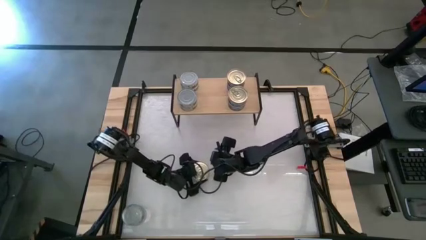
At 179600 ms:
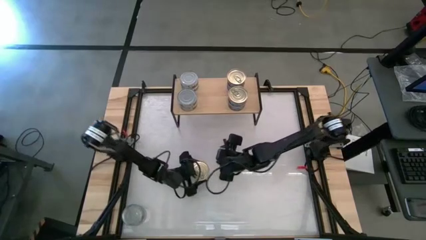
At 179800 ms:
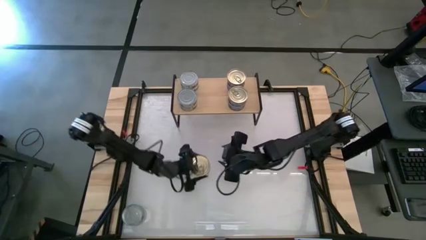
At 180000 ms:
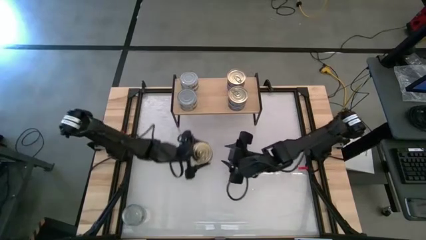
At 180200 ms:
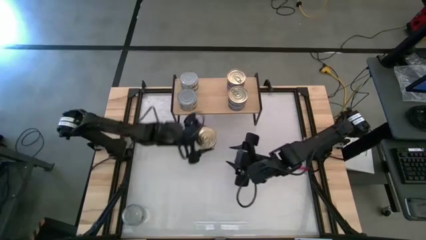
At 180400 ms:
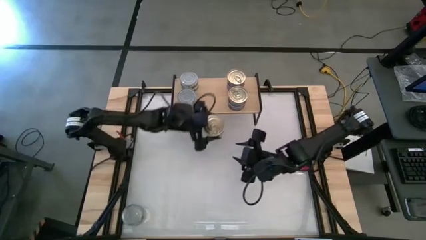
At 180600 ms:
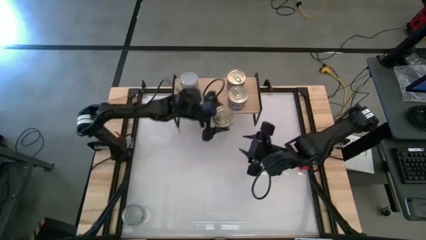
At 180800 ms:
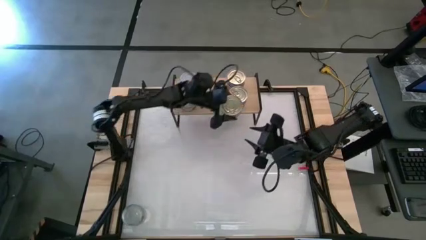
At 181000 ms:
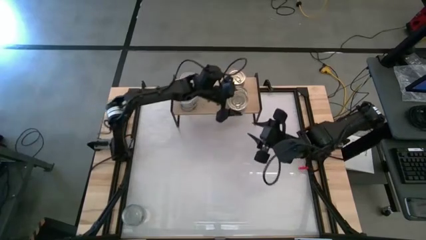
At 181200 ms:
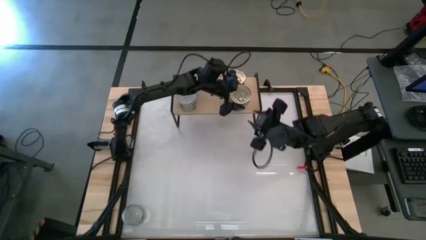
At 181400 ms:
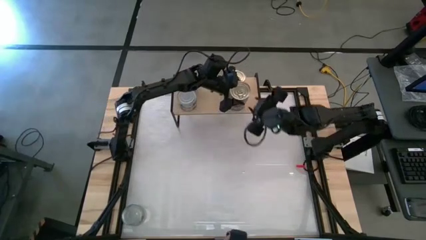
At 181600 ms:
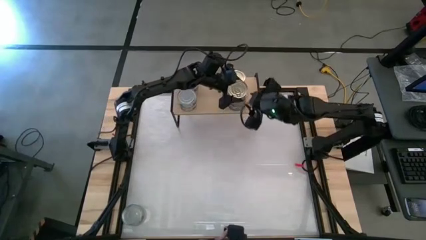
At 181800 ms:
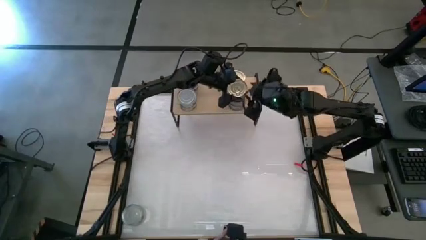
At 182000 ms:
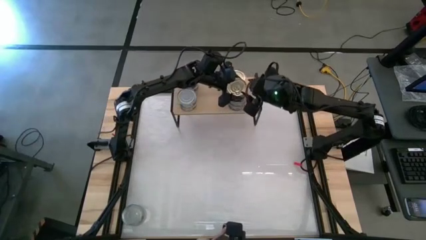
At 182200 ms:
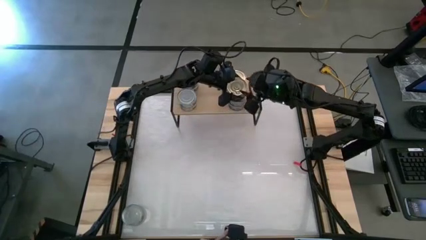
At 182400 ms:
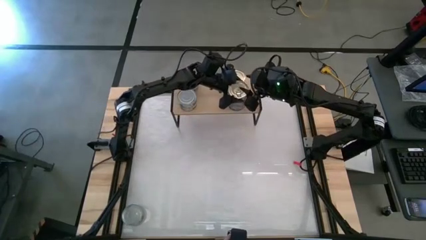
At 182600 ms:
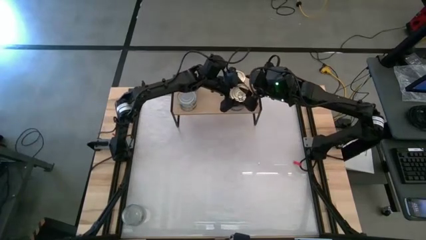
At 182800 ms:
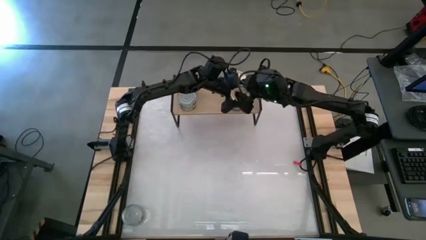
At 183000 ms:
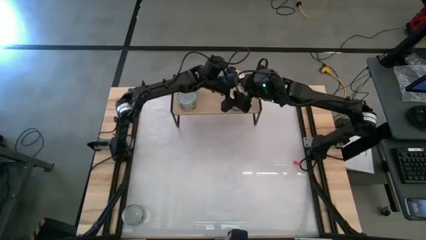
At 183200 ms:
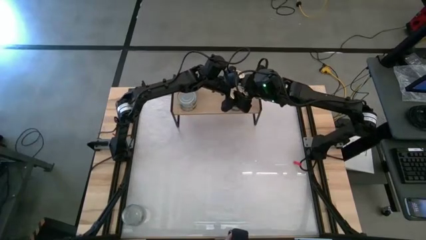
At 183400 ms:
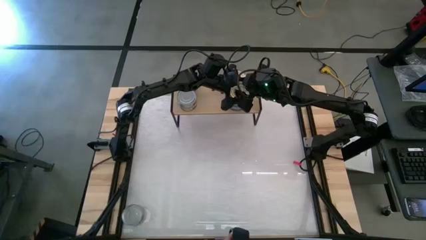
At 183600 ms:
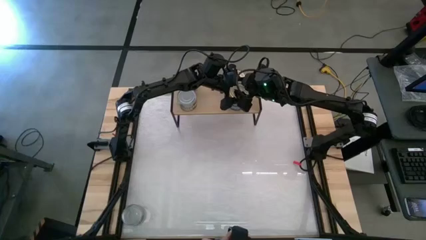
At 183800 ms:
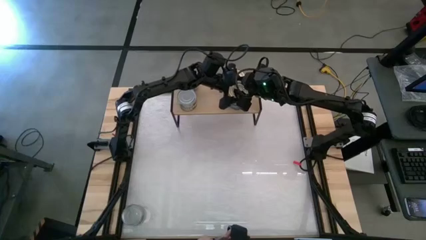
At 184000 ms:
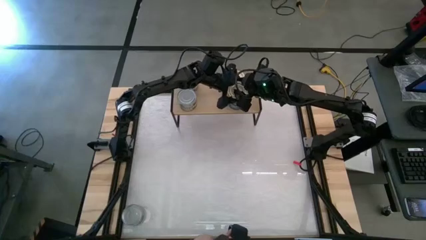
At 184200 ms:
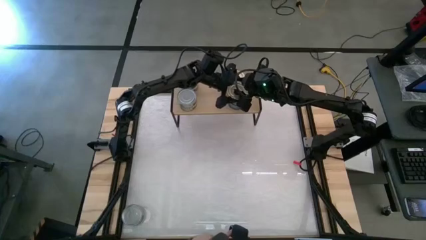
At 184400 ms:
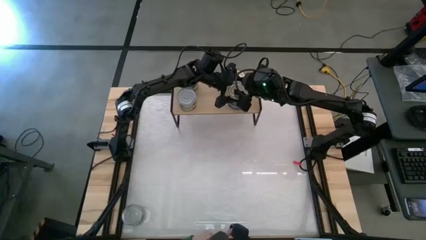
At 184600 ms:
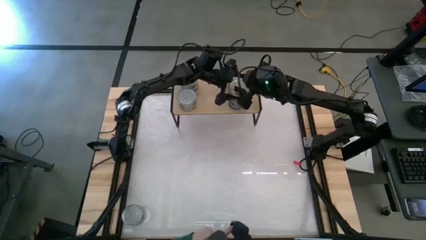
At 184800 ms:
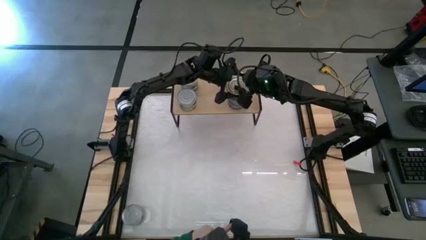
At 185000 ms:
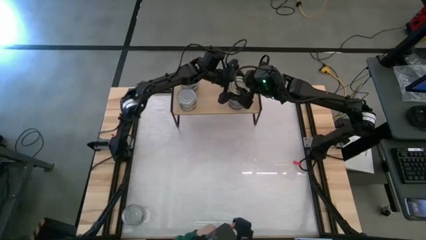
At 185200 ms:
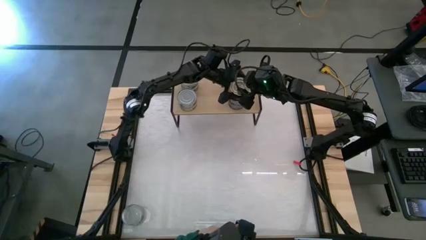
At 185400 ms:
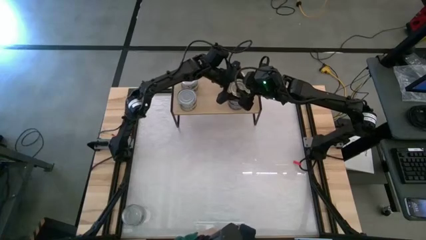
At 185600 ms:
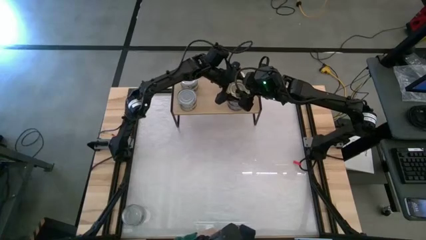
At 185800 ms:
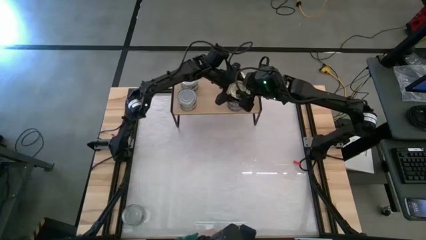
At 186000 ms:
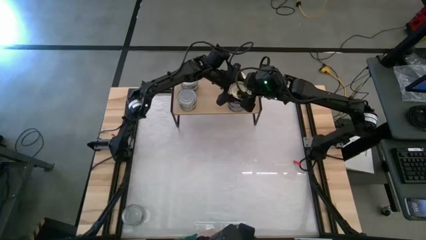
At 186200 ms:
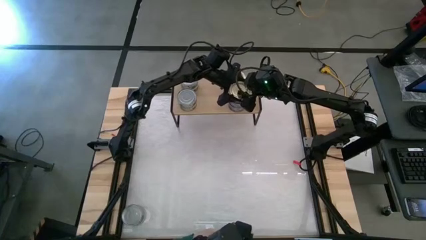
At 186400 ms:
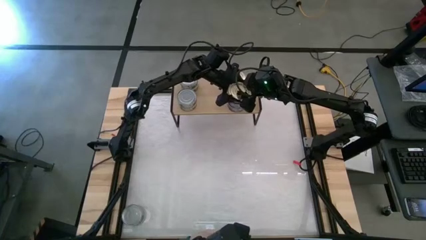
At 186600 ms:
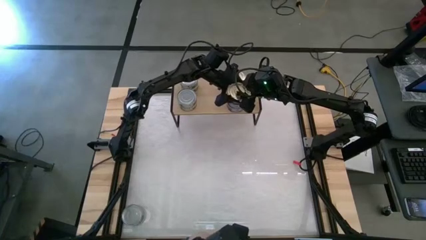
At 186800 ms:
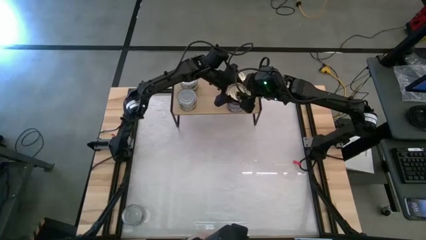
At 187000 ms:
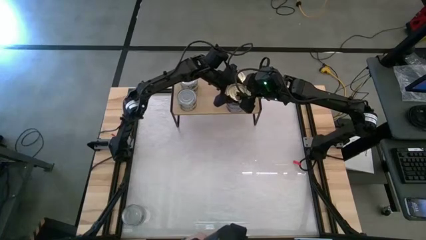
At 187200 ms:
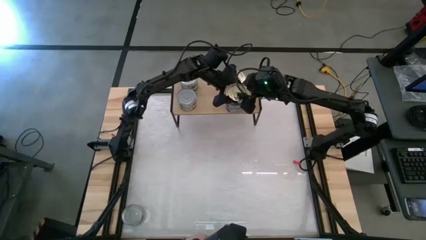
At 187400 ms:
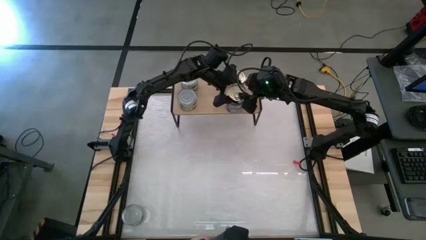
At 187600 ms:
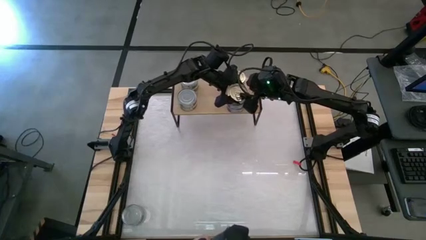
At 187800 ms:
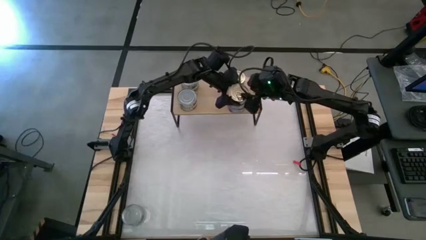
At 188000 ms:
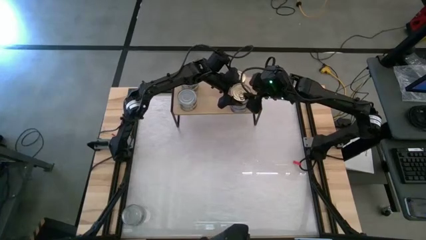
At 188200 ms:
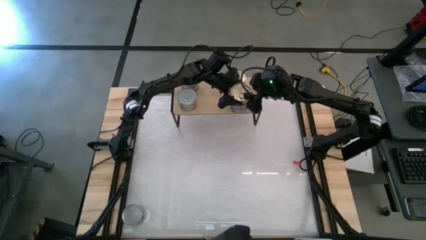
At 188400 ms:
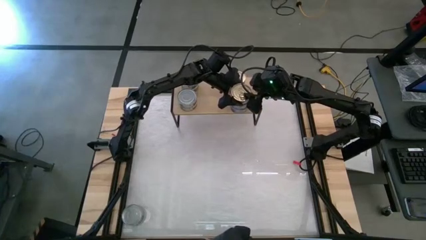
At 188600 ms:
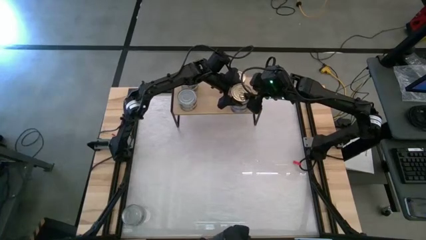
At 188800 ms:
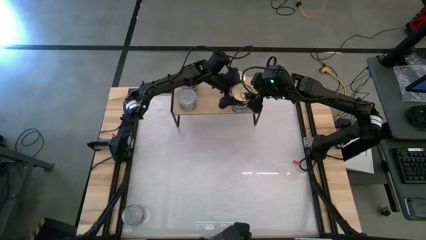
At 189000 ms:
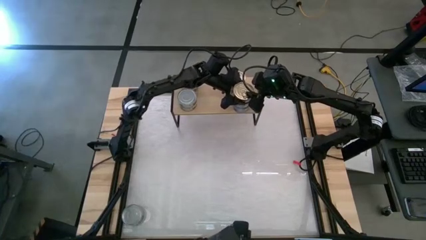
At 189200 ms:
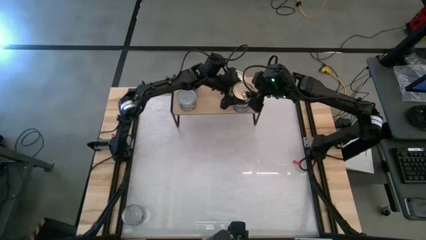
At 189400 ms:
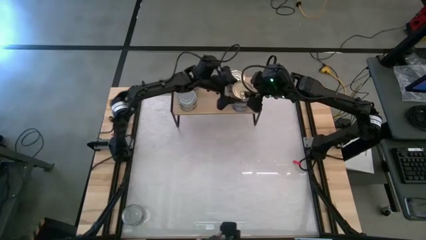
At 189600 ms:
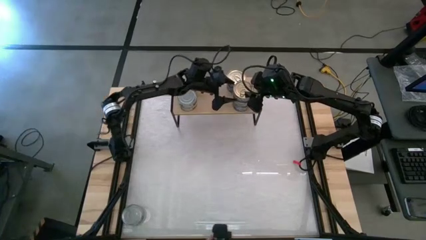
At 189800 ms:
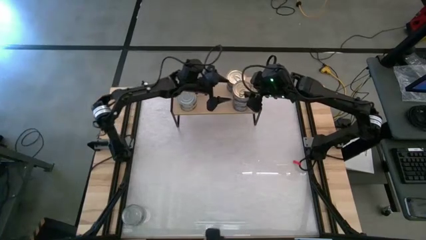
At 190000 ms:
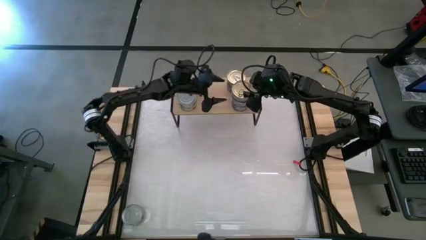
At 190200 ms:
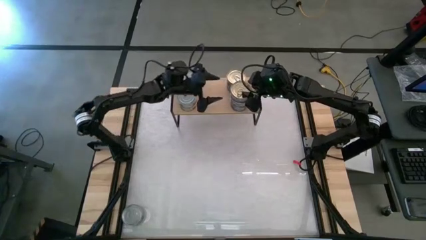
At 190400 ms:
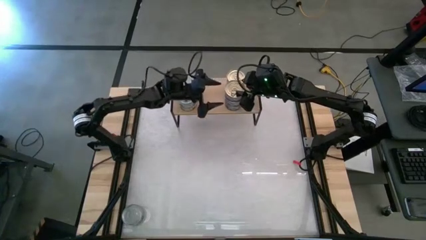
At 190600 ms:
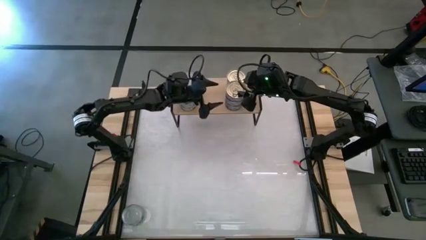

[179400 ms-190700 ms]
Task: Stack canned seafood by type on shelf
Stack the blue tuna can on top of the blue tuna can on the shelf

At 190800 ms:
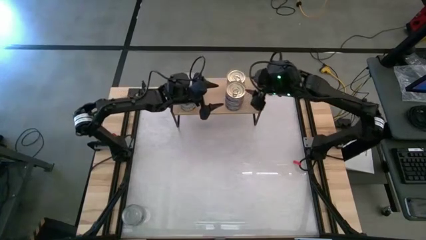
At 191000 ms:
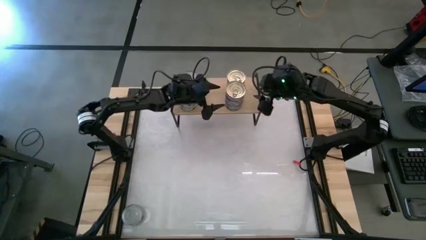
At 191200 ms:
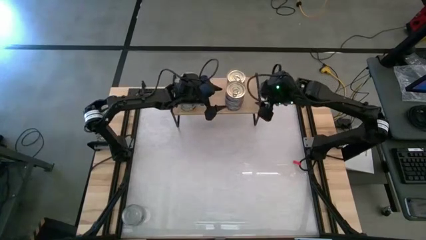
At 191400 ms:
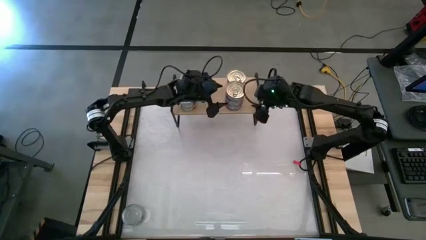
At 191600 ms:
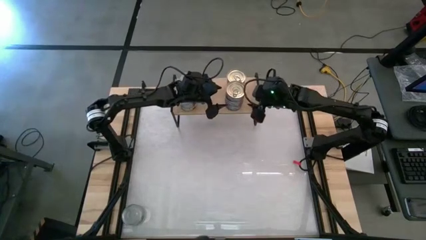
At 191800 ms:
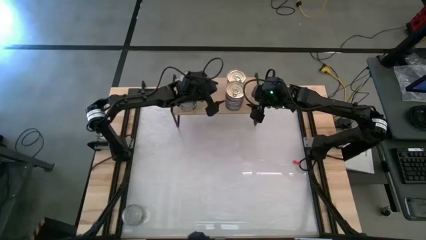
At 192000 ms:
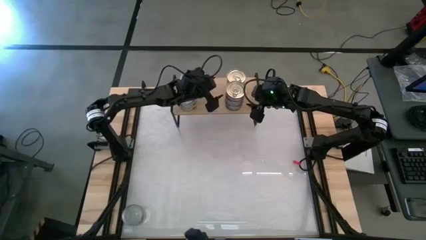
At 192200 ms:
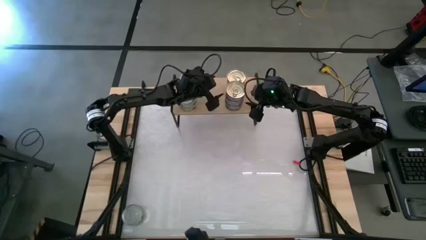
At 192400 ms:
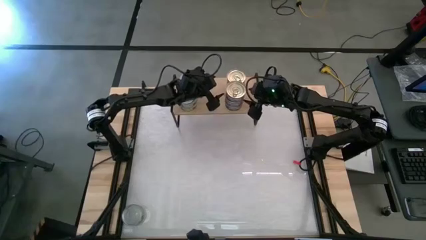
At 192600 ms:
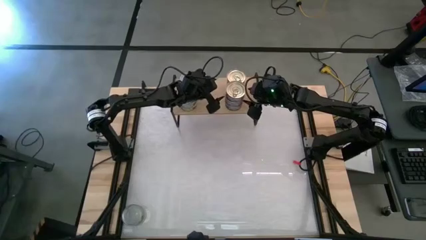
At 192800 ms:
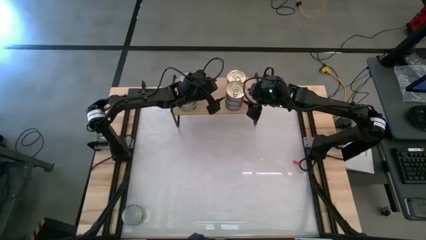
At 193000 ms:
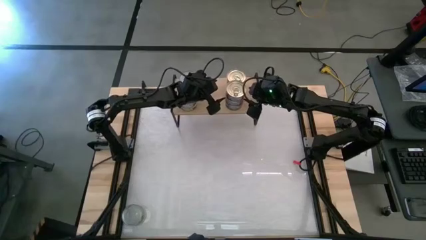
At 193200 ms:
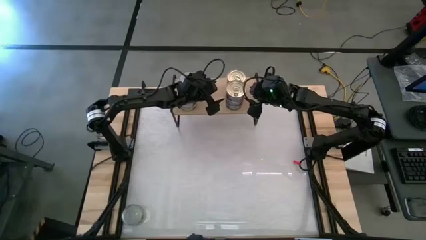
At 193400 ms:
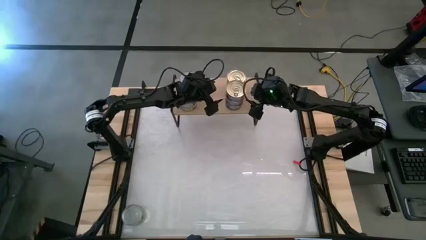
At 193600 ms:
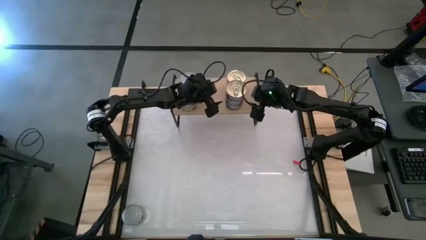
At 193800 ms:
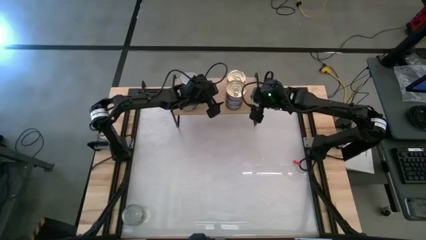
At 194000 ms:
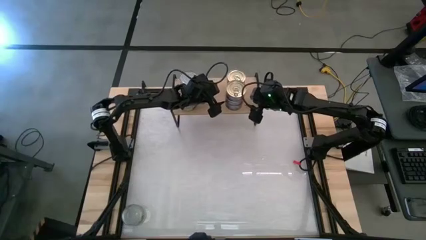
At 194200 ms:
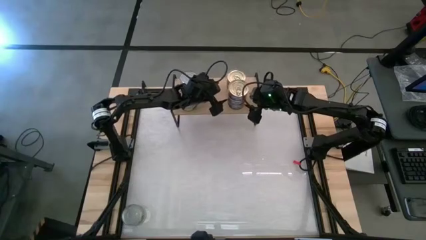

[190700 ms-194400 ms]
Adjust the blue tuna can on the shelf
